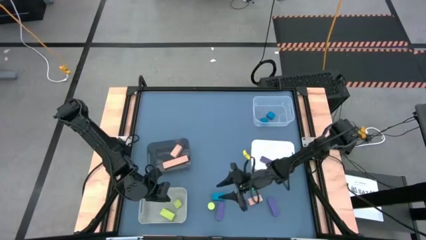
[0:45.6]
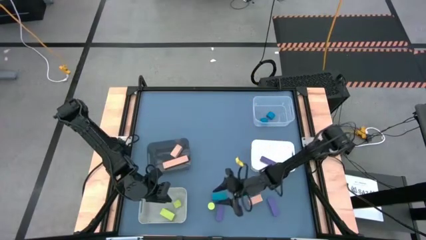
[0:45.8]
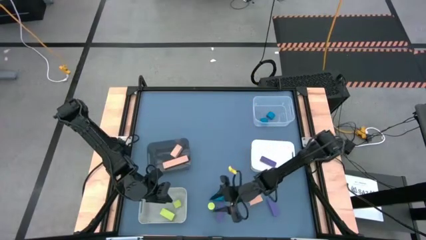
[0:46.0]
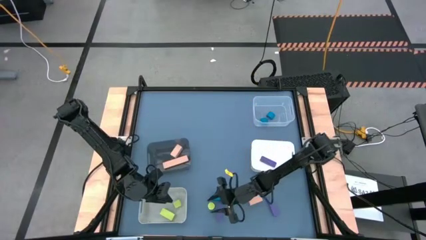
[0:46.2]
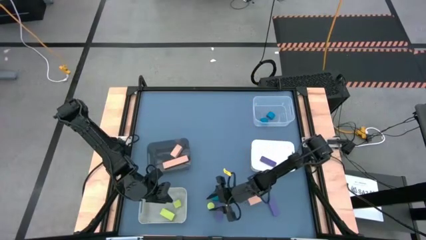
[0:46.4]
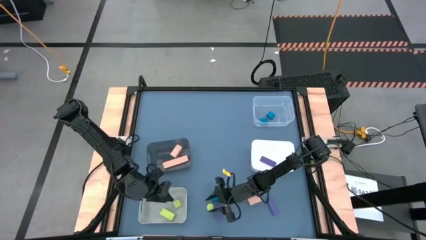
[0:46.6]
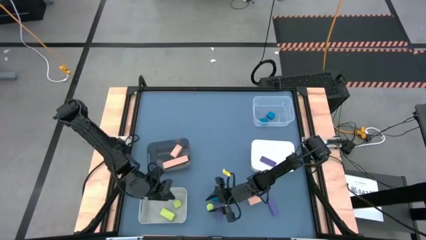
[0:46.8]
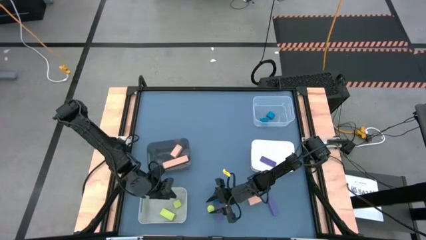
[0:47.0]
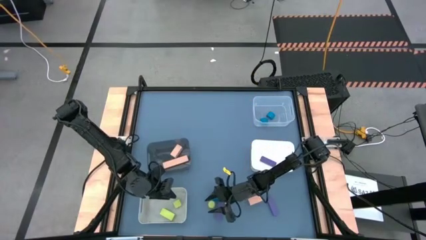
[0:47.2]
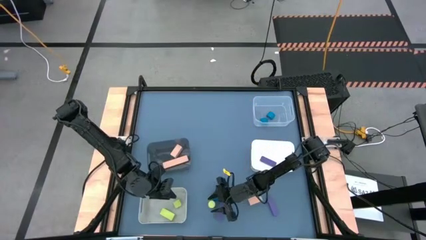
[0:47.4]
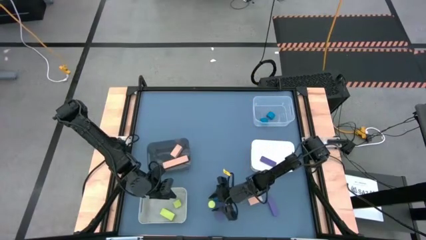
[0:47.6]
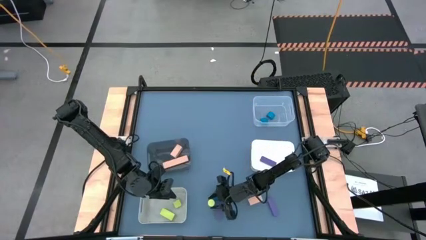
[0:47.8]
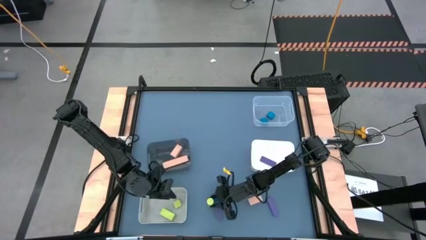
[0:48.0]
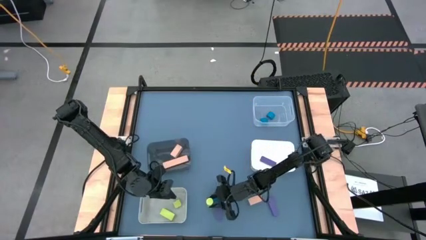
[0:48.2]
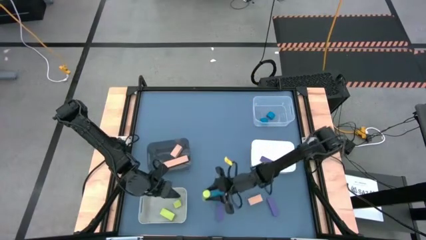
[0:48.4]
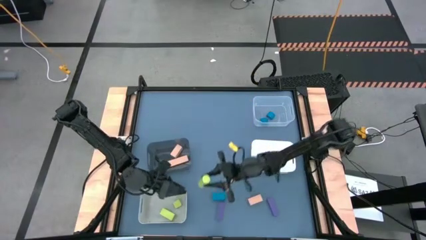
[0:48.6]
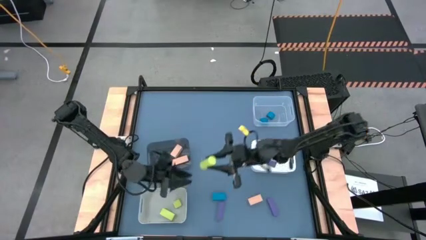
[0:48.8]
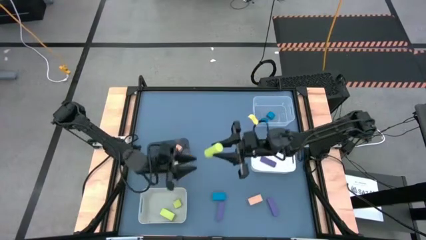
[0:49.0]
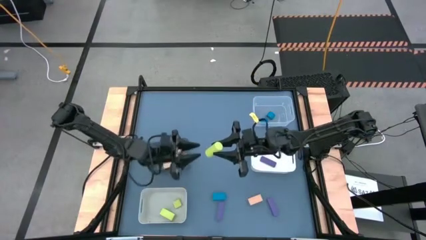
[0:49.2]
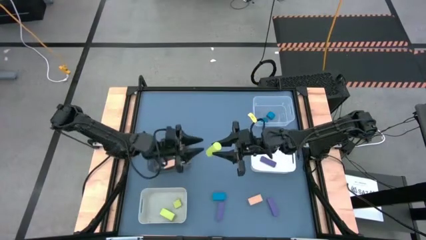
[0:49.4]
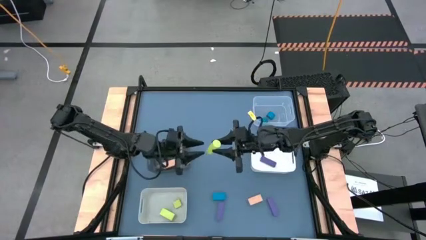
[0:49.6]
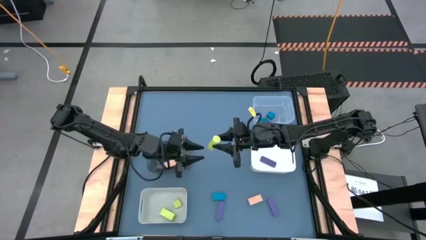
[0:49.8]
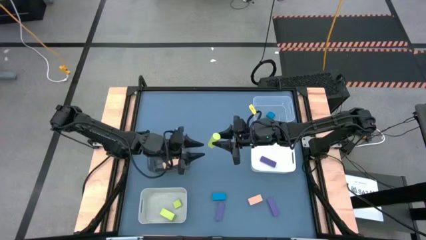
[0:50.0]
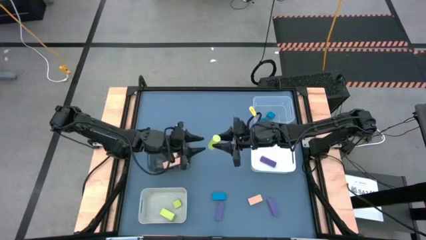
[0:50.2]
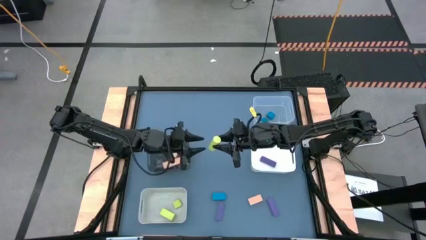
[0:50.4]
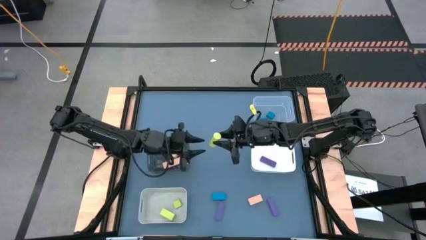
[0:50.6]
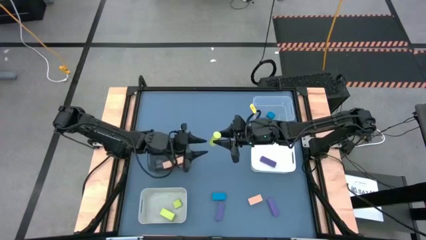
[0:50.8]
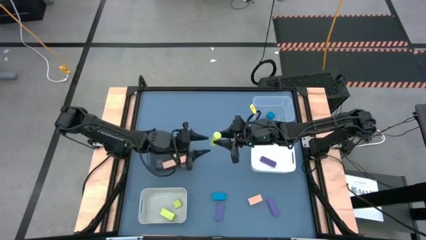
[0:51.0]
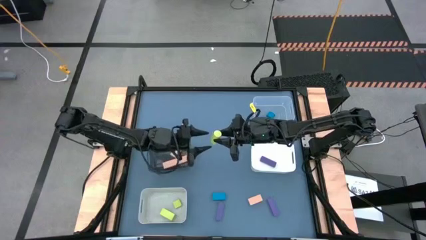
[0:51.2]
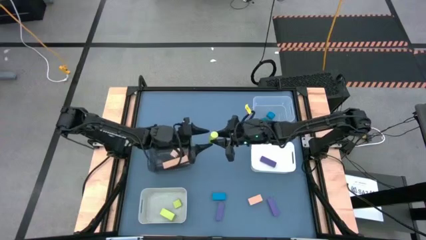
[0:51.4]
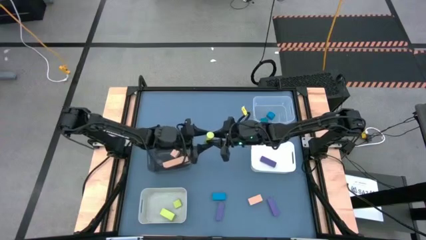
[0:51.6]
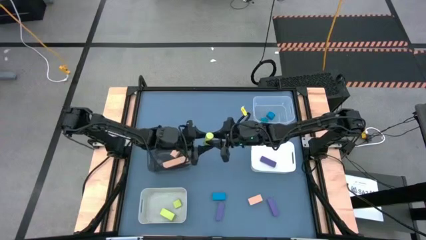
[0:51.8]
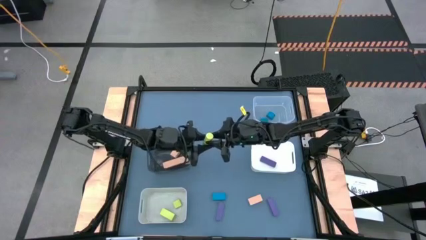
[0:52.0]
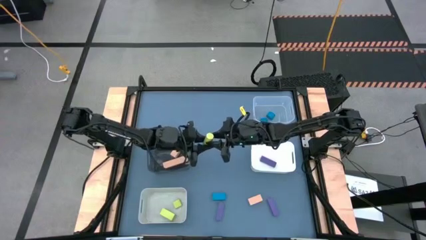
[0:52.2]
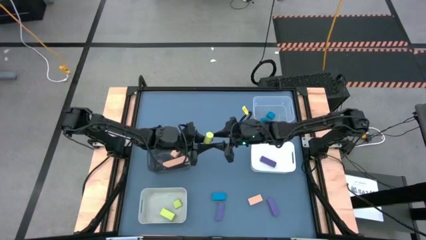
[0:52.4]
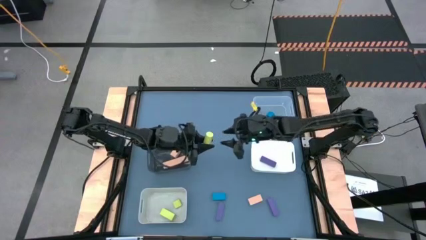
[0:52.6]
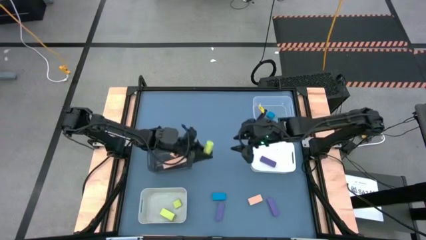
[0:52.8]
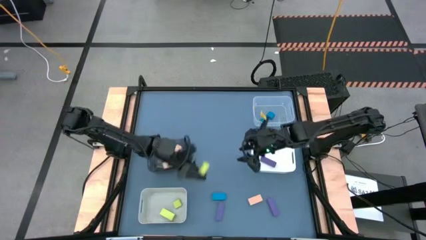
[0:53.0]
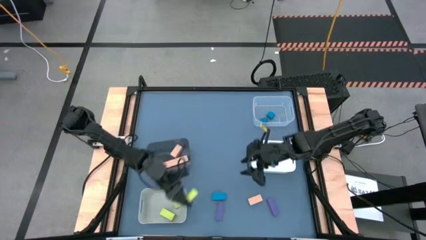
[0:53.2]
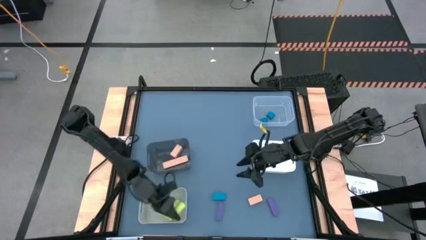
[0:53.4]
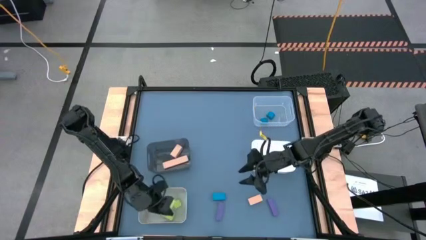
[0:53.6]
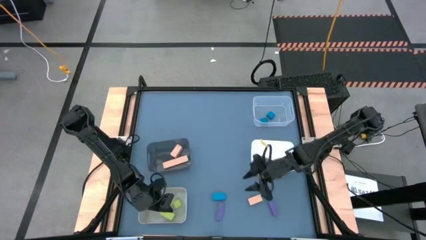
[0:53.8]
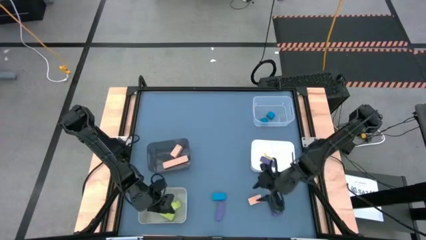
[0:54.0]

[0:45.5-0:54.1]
Task: Sort & place blocks by color
Put the yellow block into the gray bin

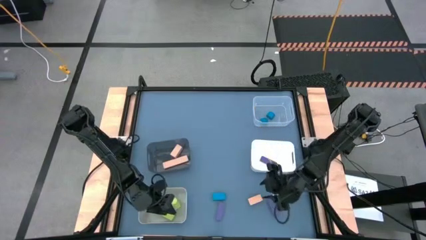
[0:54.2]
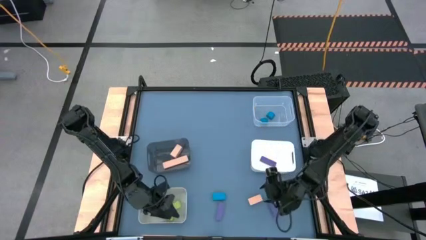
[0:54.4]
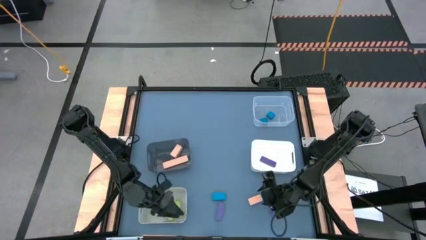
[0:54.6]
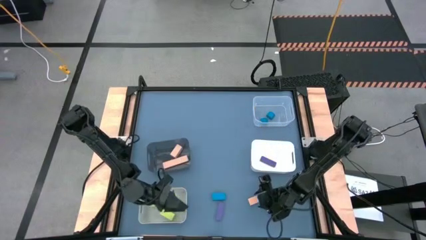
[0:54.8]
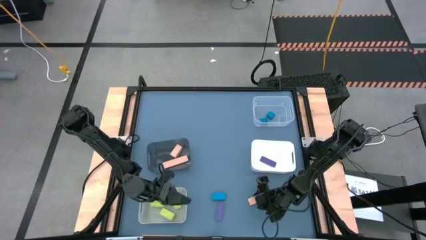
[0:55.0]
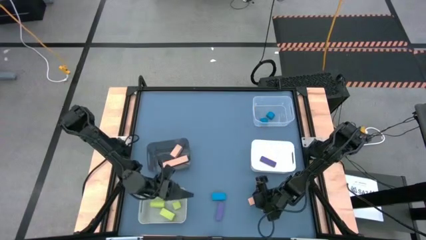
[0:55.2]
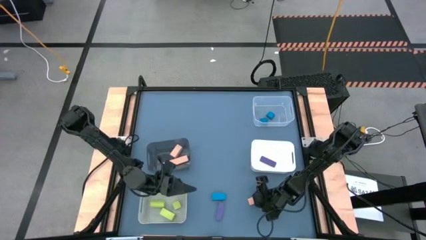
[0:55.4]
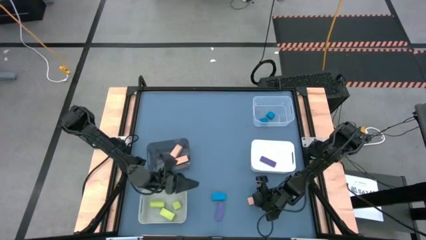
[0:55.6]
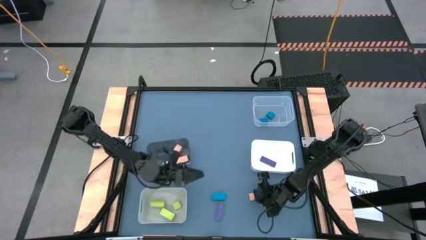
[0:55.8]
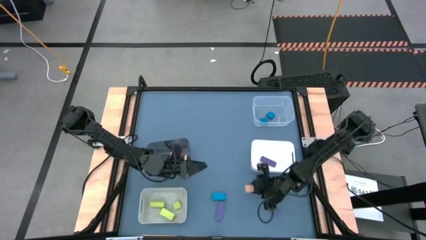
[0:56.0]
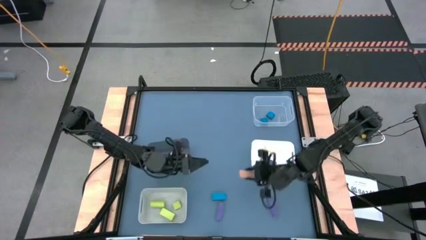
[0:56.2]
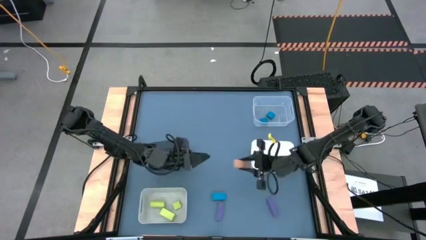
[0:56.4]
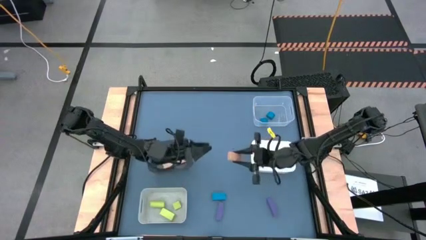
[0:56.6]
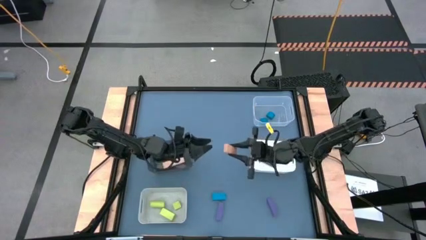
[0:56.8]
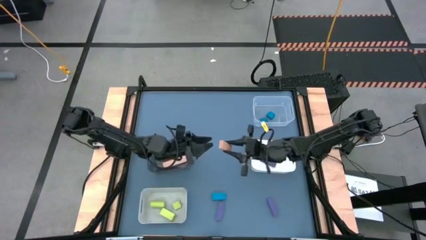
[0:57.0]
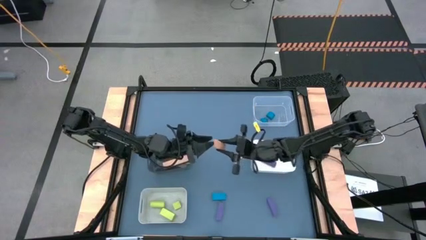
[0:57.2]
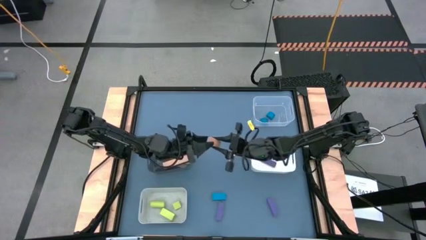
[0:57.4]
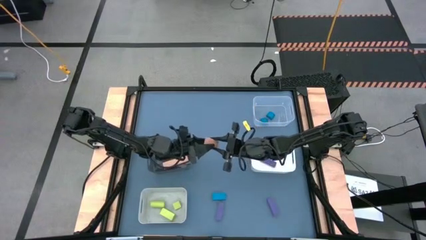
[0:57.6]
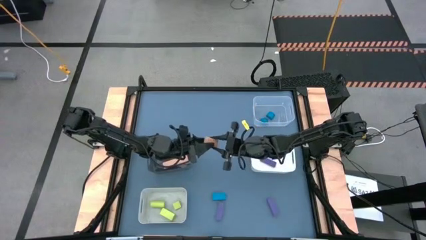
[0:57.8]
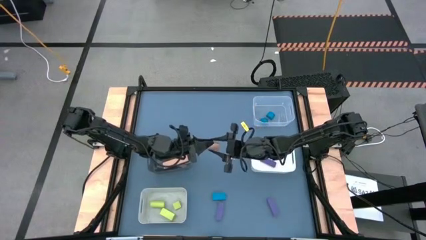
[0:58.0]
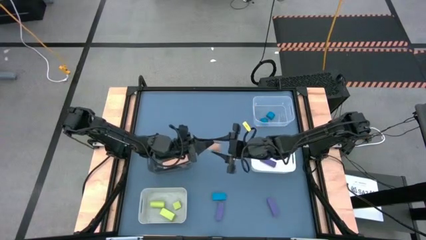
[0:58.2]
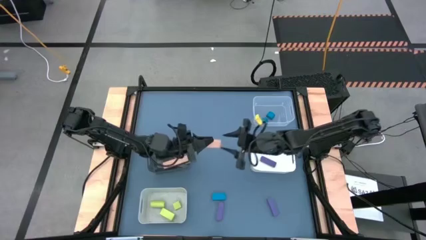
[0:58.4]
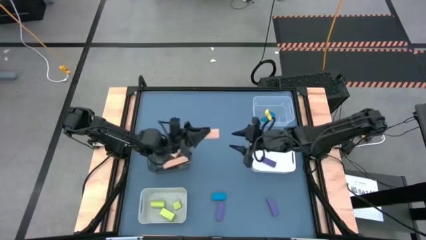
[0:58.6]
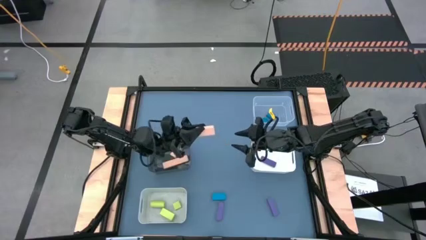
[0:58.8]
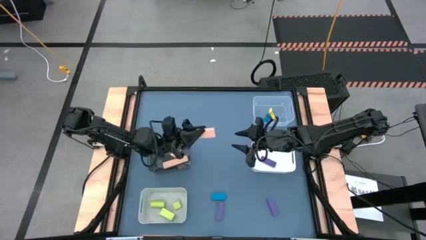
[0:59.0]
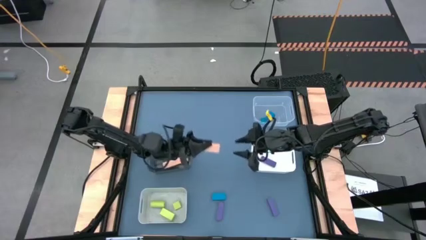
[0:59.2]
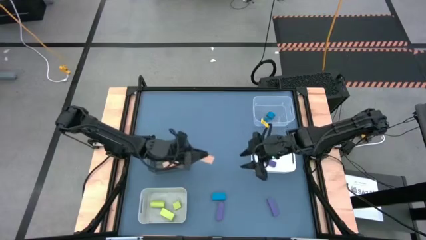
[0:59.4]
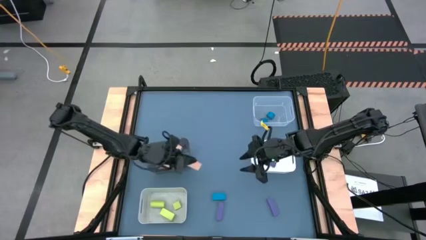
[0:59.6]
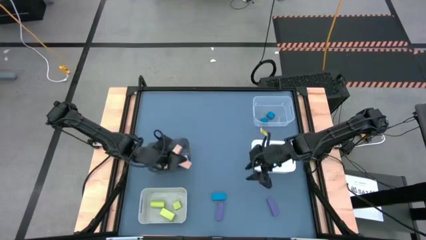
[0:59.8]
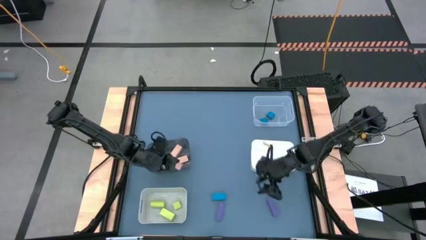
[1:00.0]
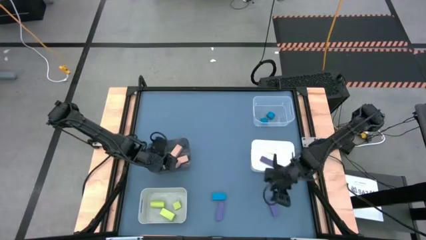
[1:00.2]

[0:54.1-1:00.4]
Put the orange block into the black bin

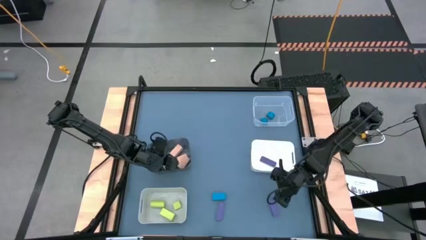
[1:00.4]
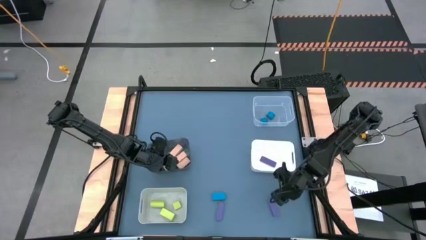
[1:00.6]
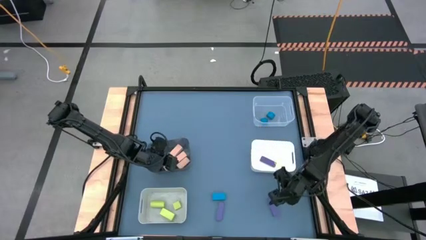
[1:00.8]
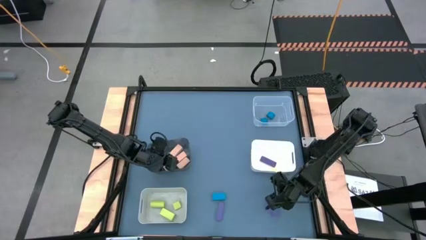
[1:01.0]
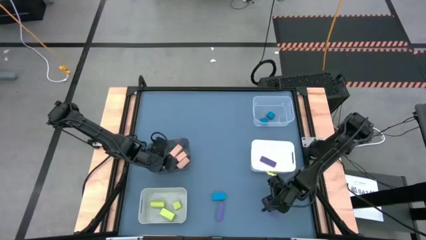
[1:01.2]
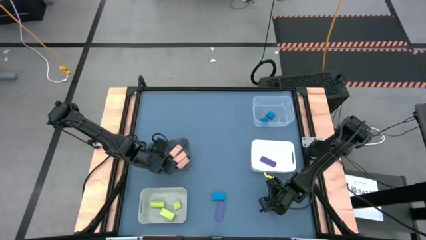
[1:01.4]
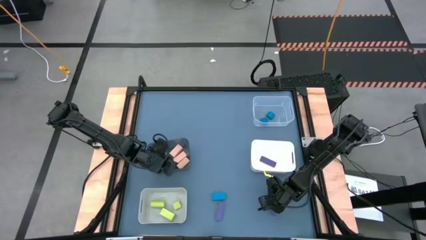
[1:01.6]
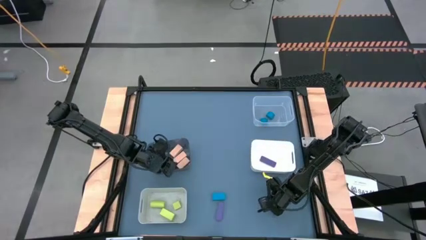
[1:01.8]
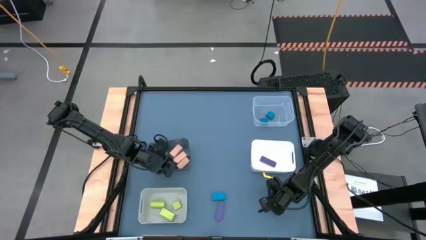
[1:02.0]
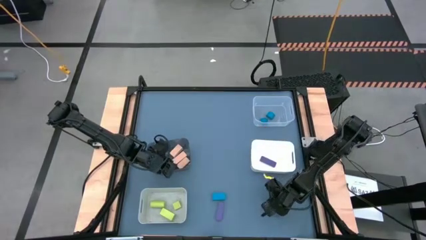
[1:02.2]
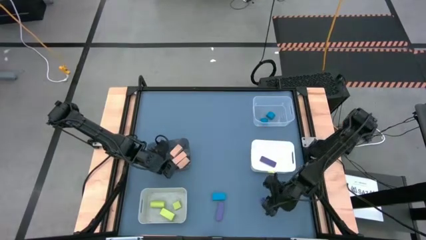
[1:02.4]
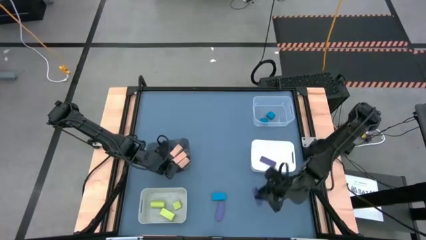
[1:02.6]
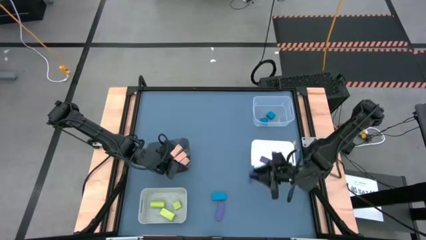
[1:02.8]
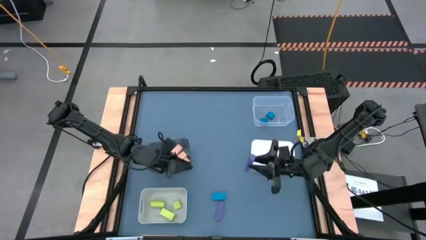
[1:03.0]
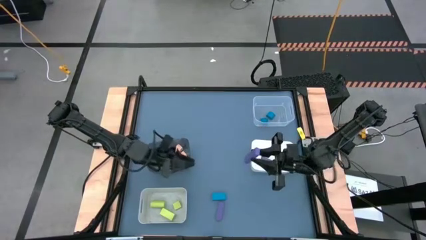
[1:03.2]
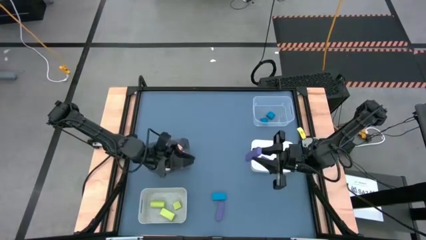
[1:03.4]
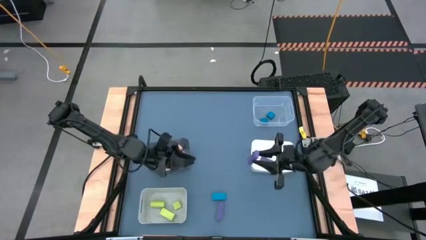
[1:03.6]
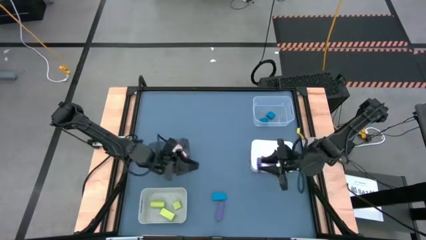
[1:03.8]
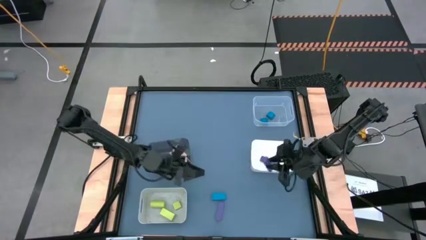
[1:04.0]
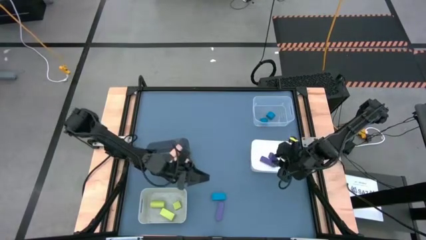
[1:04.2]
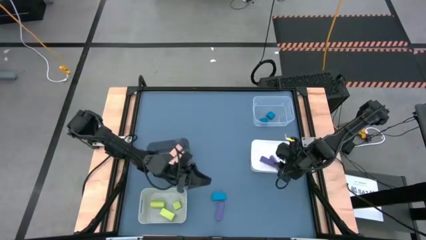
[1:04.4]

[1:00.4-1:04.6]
Put the right purple block into the white bin
